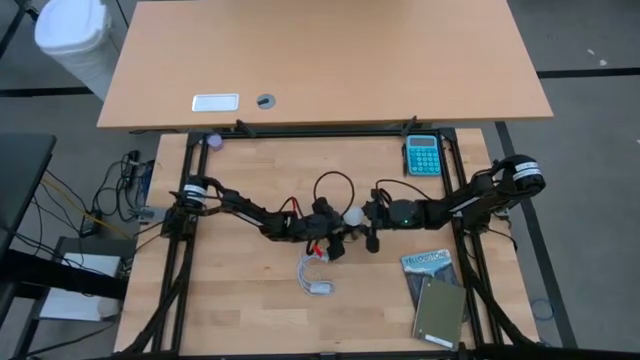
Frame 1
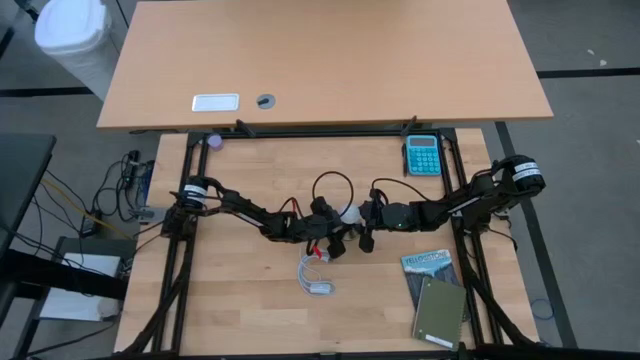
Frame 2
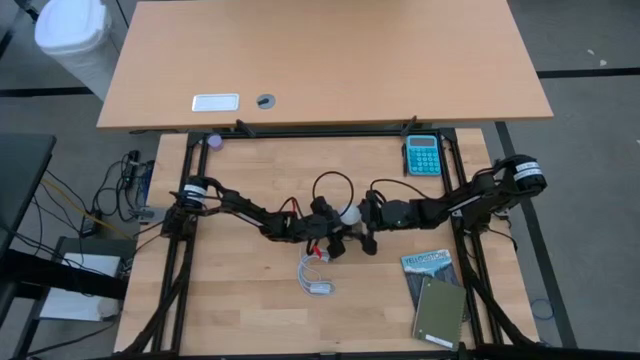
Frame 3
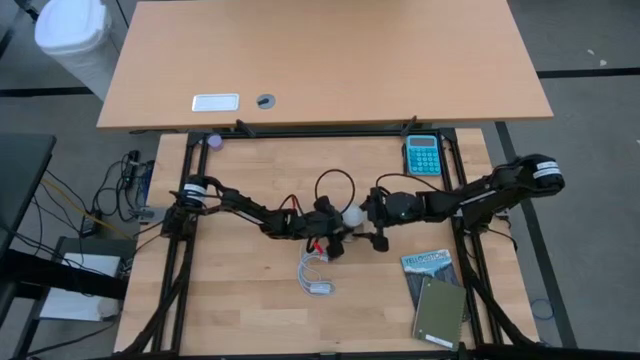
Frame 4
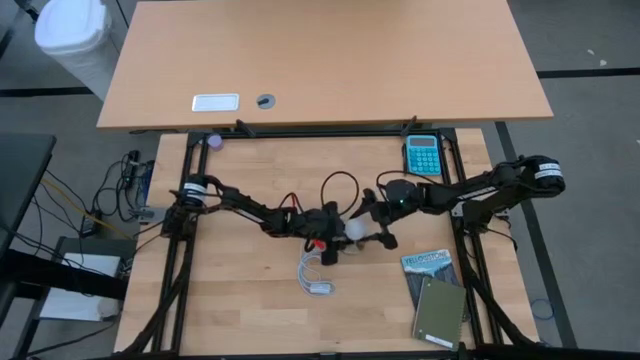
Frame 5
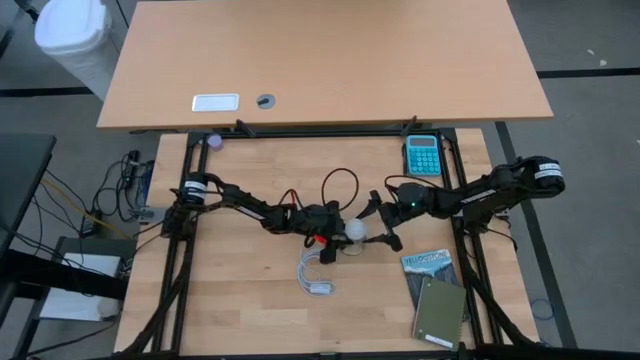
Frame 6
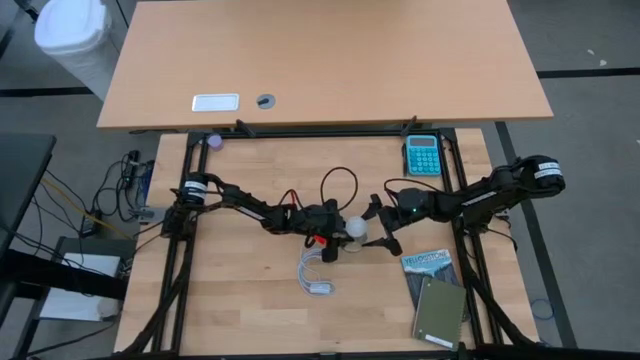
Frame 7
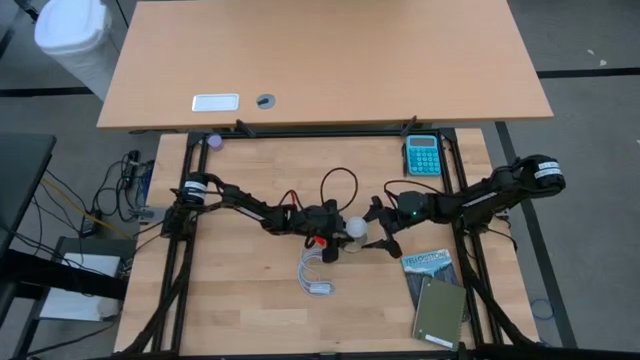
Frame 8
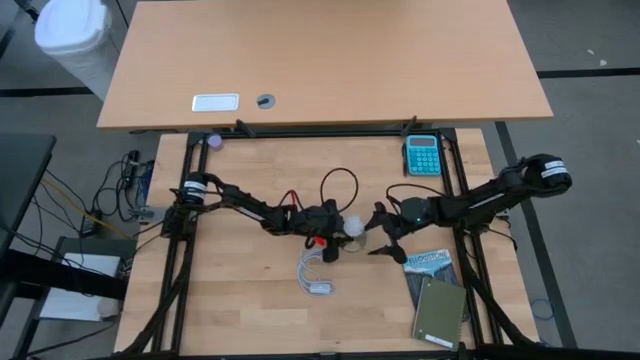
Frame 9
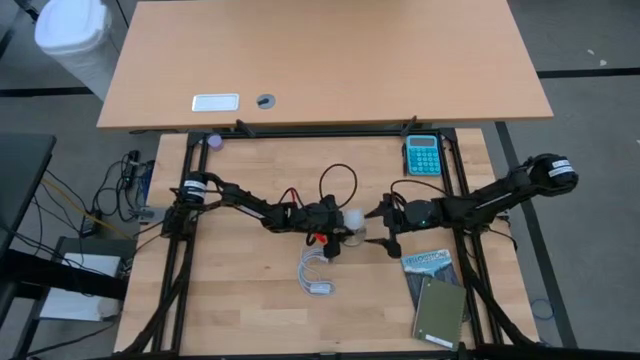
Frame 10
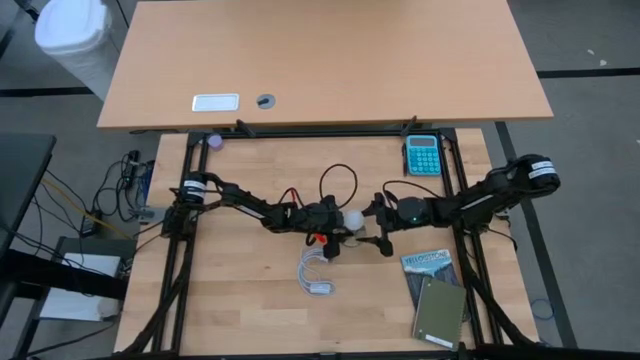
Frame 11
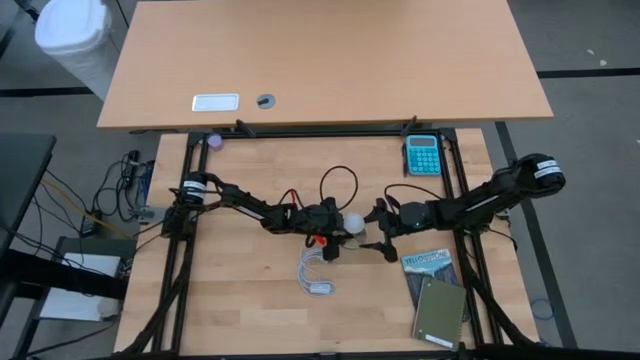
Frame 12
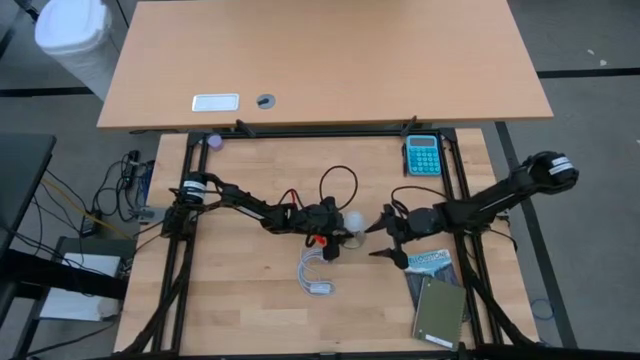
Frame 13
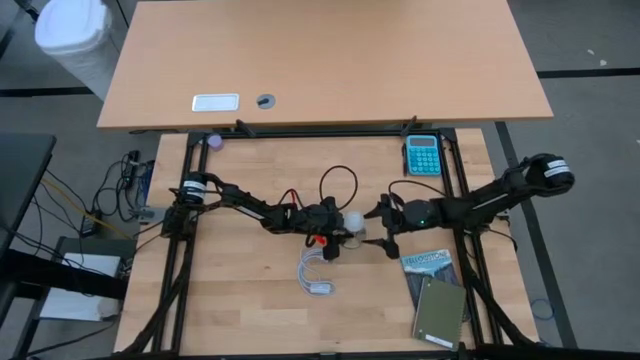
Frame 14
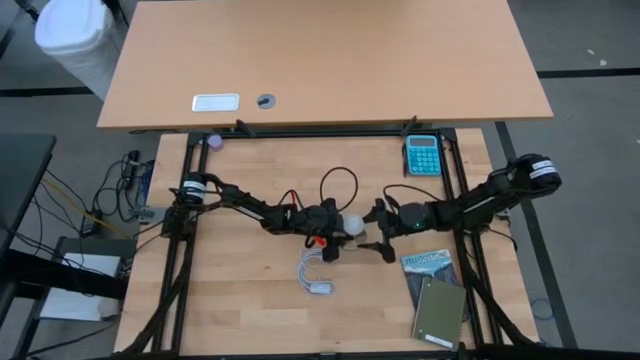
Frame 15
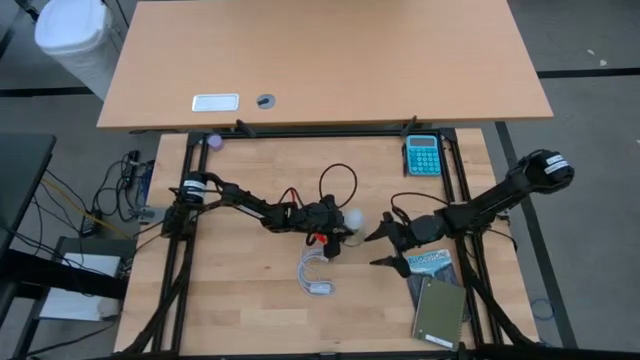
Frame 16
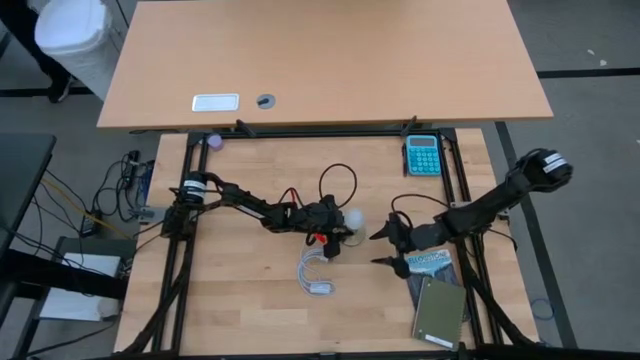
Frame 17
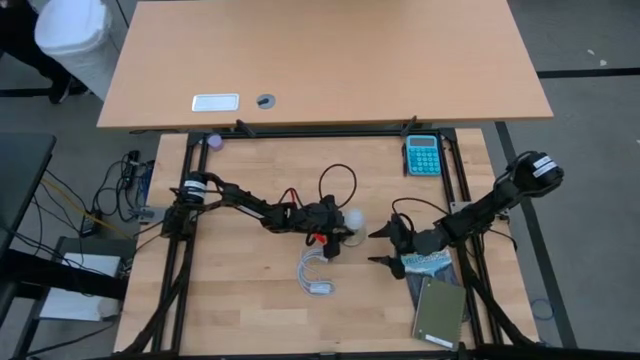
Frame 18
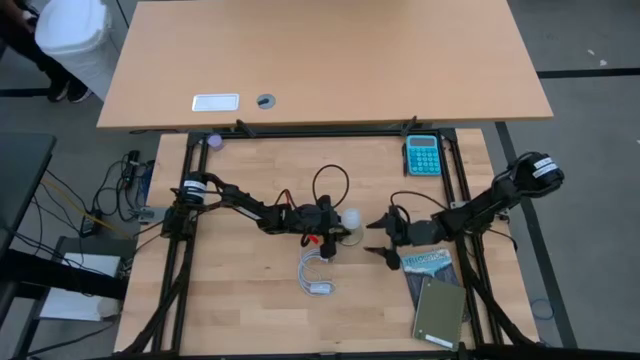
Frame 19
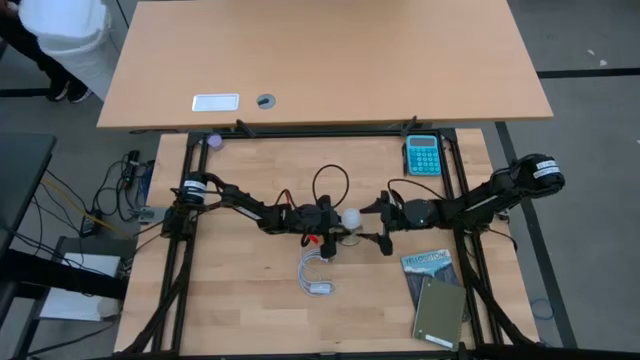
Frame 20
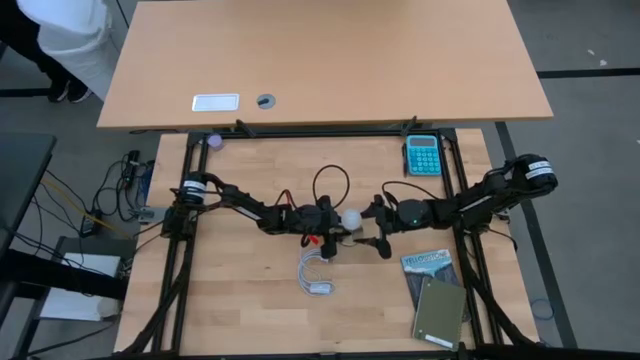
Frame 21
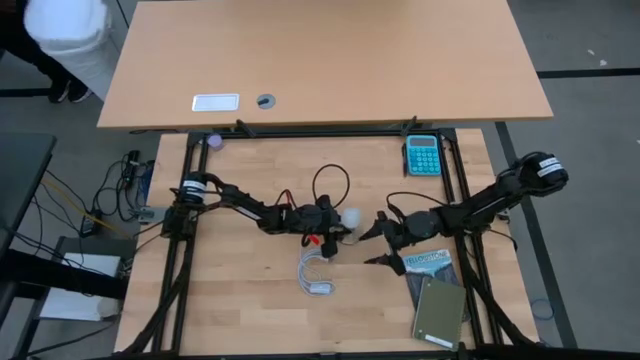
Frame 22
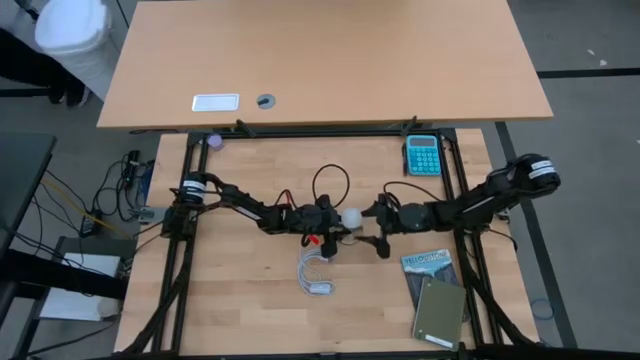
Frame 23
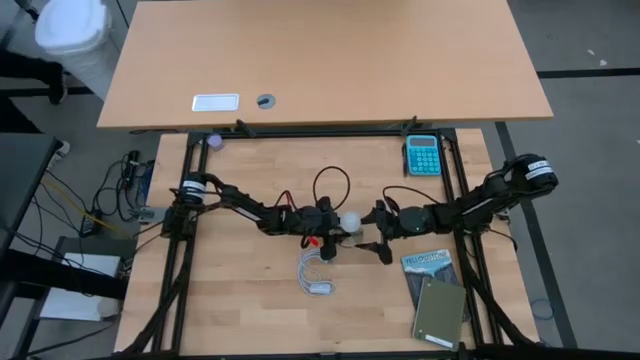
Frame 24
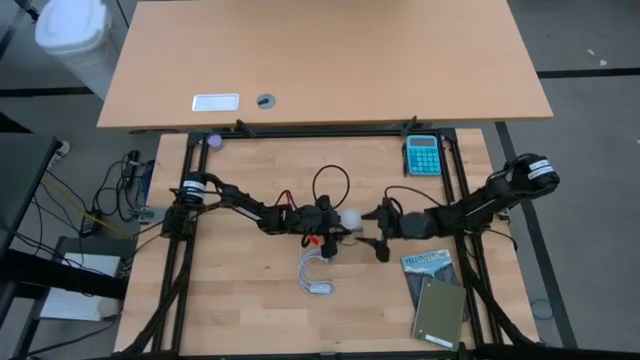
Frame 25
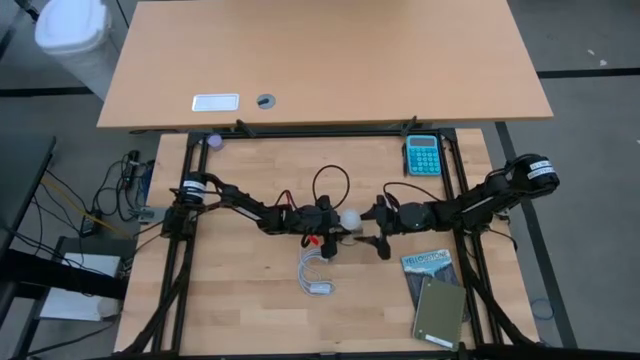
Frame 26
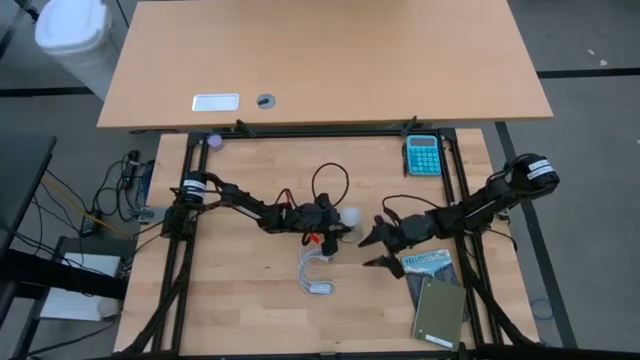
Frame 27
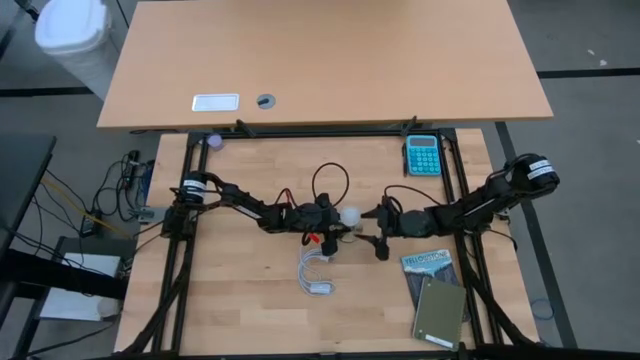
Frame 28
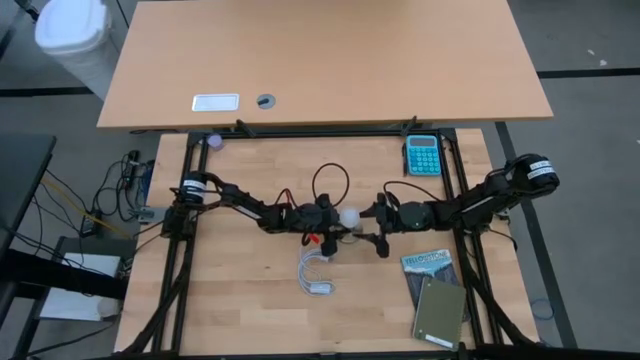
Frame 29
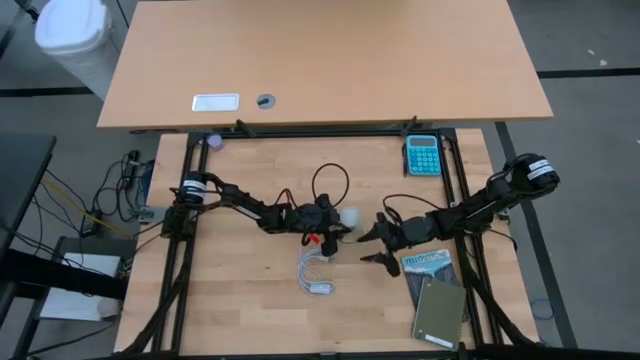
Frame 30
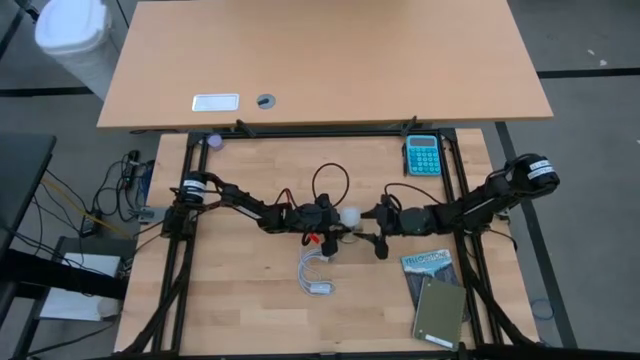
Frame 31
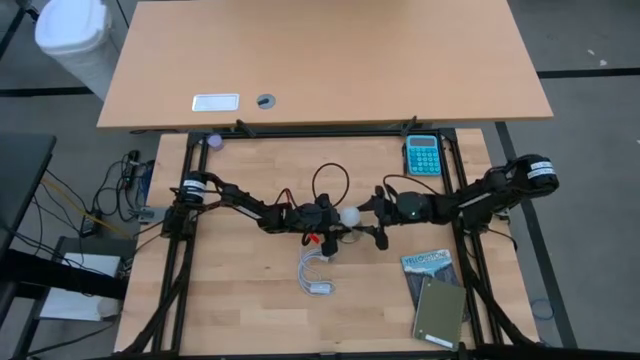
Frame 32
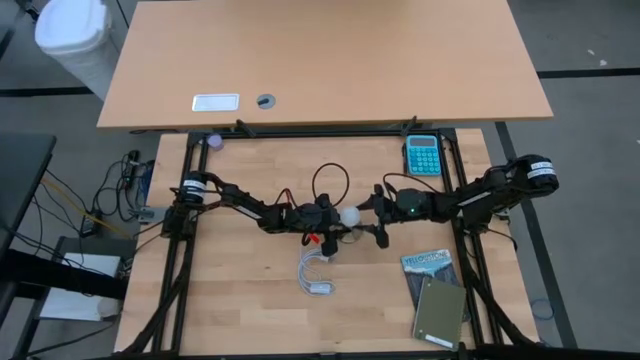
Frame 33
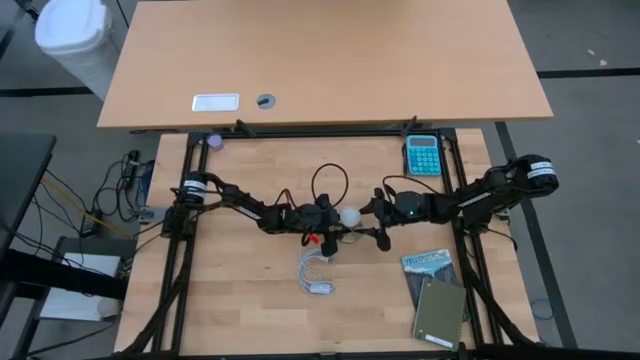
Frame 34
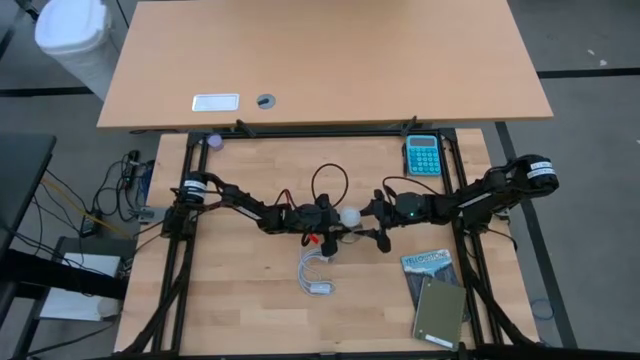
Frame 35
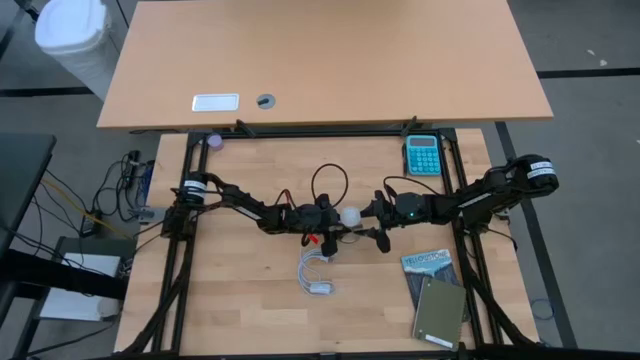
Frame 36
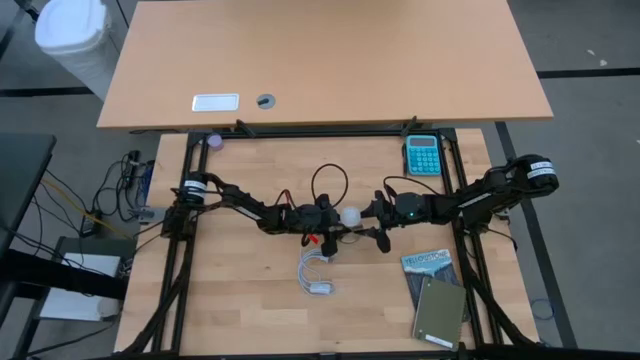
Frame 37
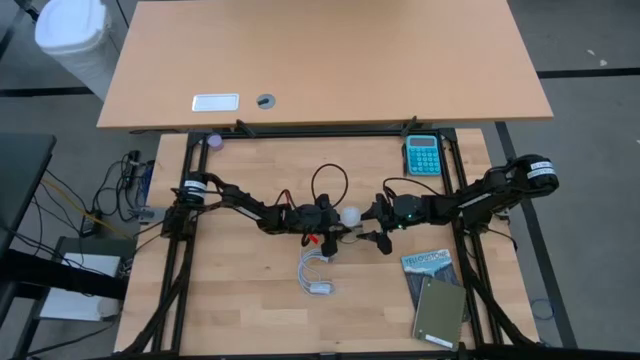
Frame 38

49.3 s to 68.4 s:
Task: Screw lightbulb
Insert the lightbulb into the desk lamp

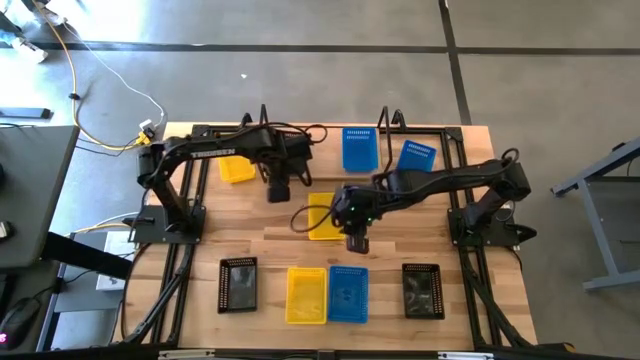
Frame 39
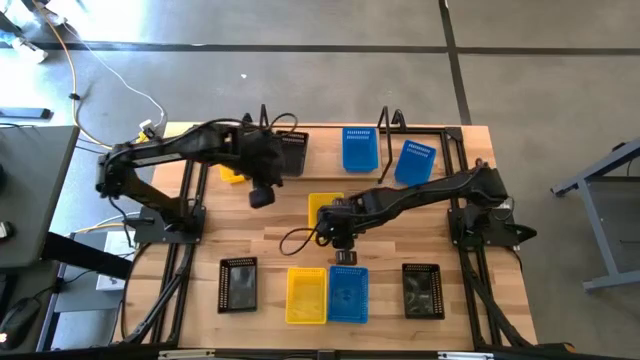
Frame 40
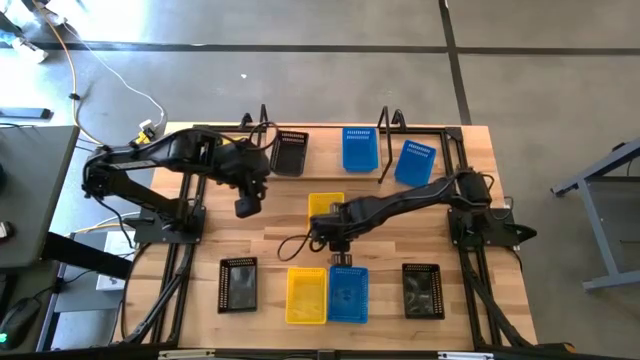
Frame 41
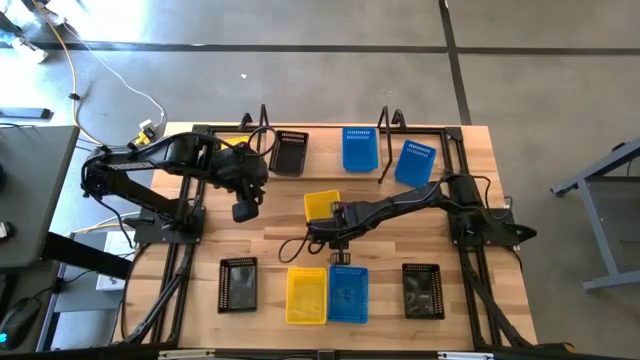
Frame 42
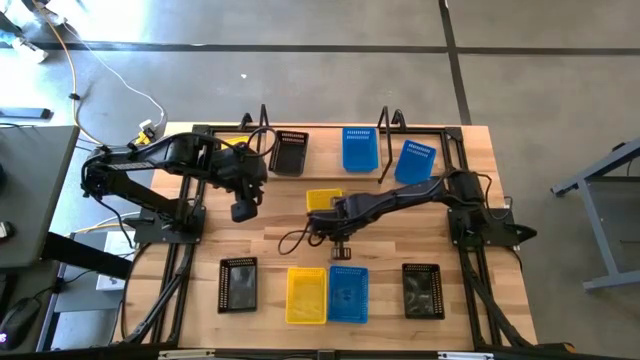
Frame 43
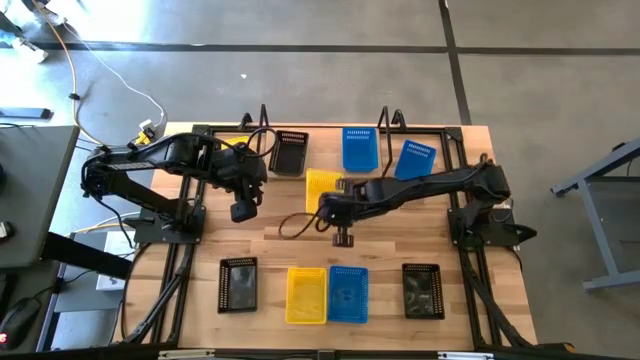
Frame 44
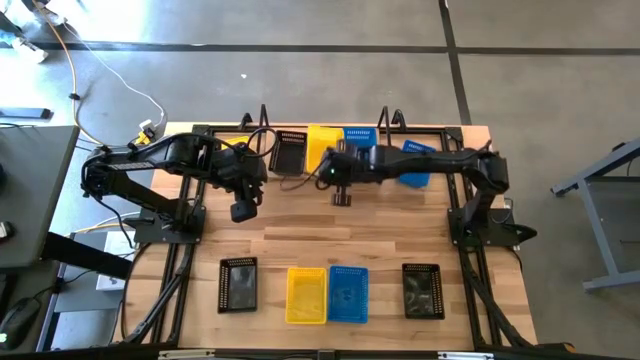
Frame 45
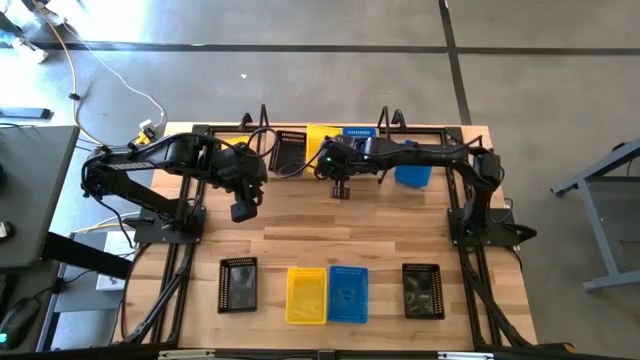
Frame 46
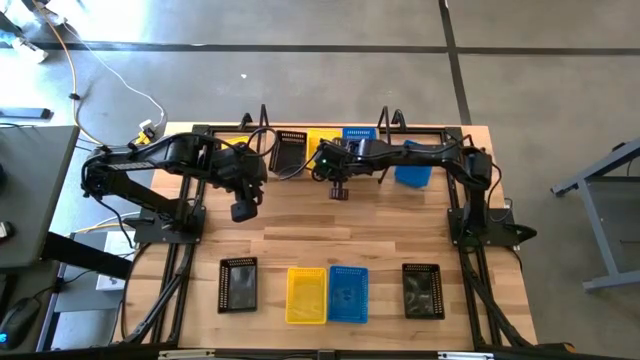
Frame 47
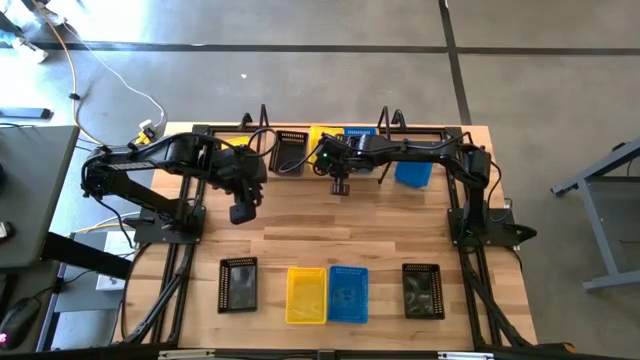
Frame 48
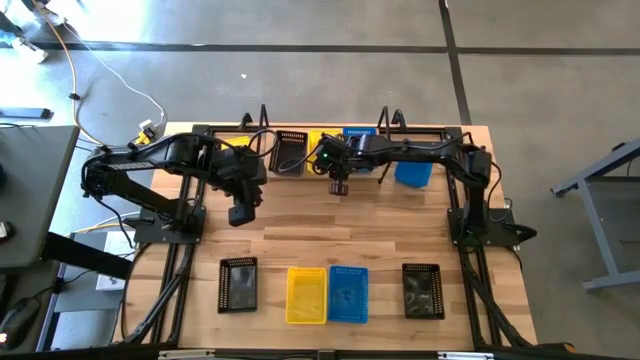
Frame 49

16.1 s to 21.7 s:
Task: Stack baskets on shelf by color
Put the middle yellow bin on the shelf
